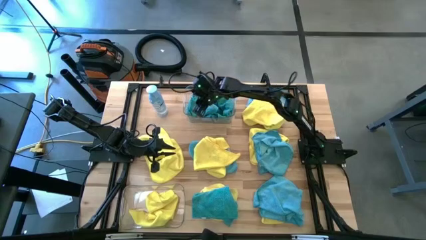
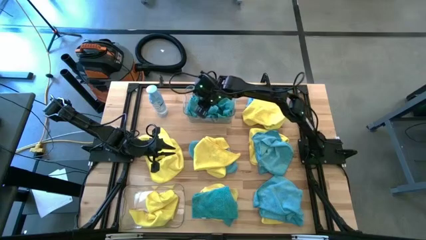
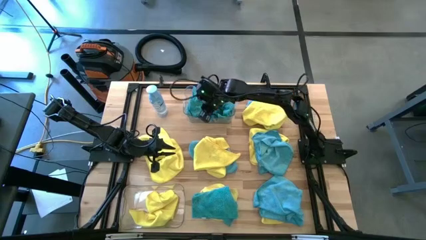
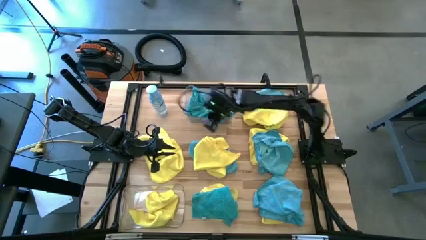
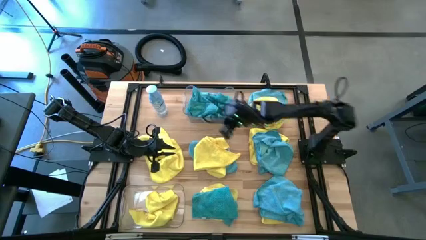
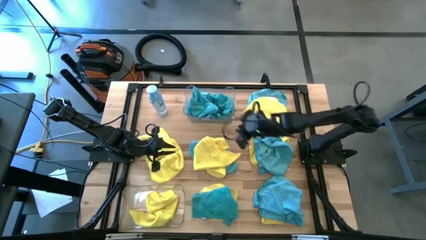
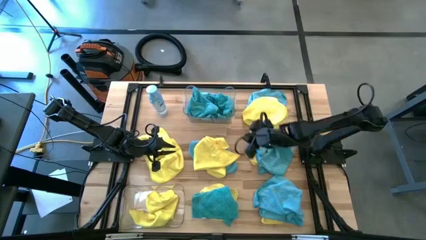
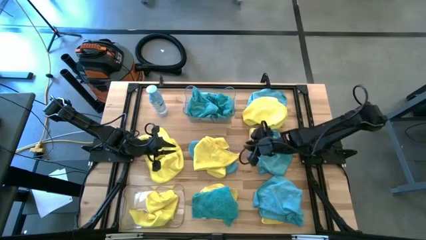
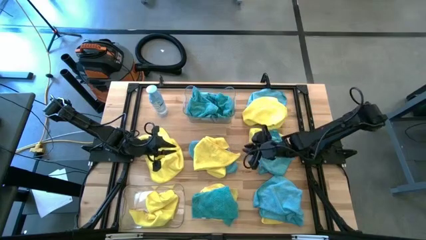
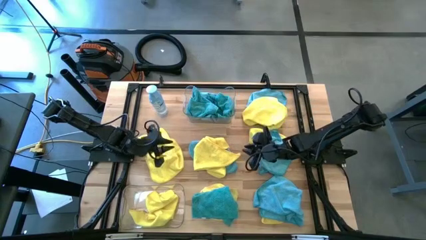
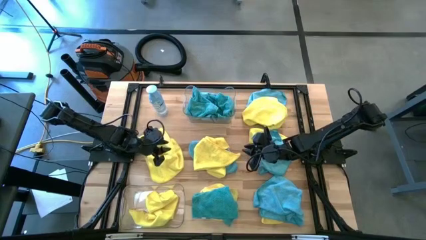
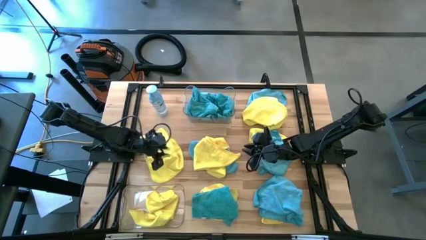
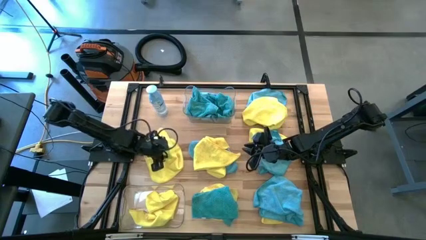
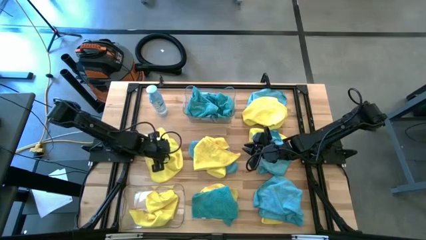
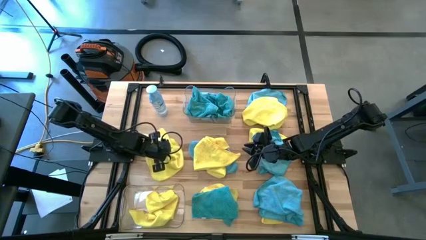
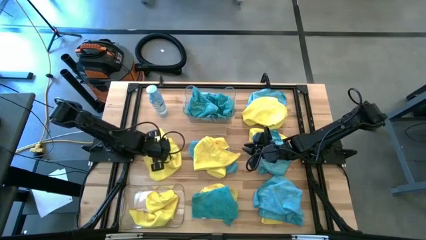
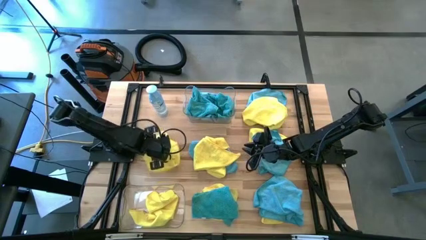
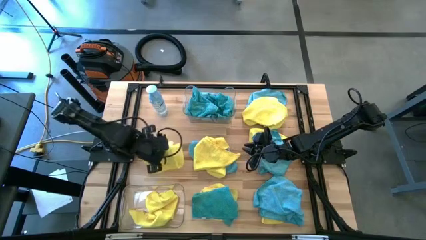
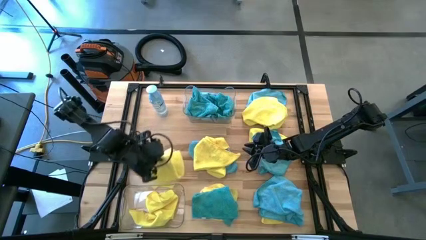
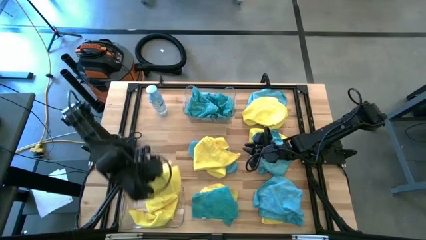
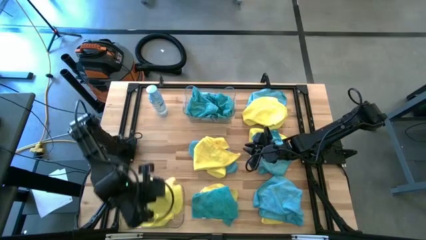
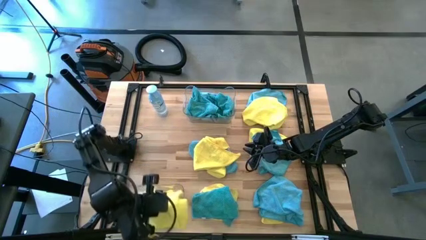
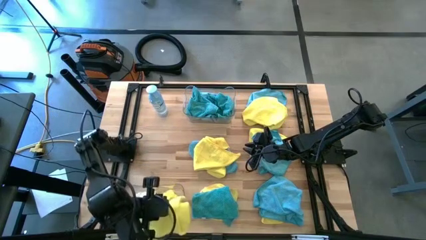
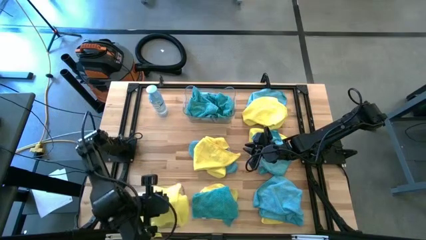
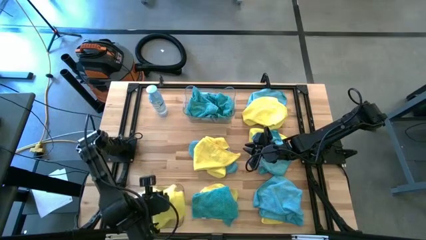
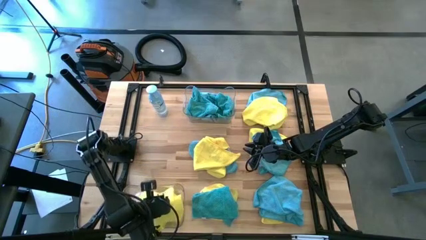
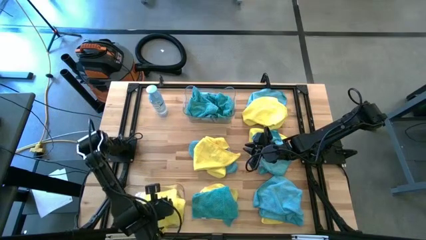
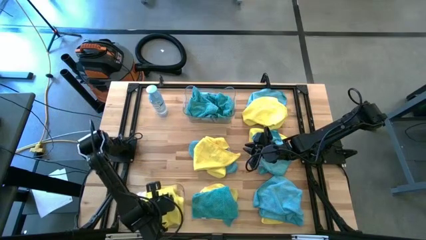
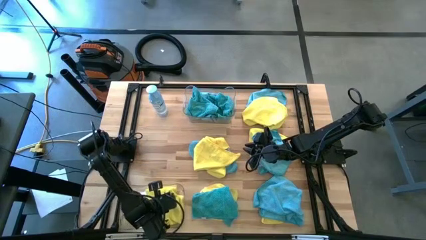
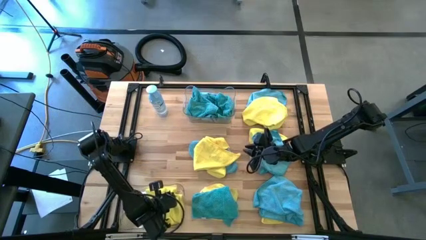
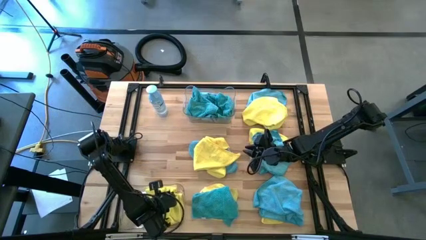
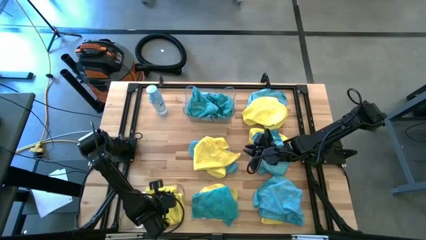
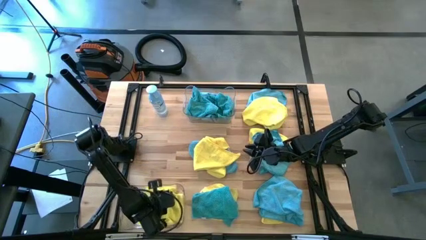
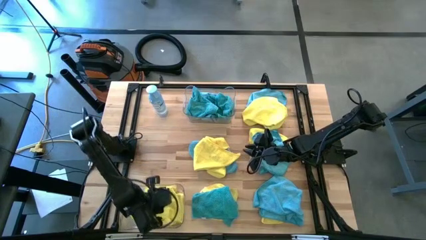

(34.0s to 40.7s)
Task: Sort microfiber towel by color & place in baskets
Put the yellow microfiber towel into the bottom transparent bin

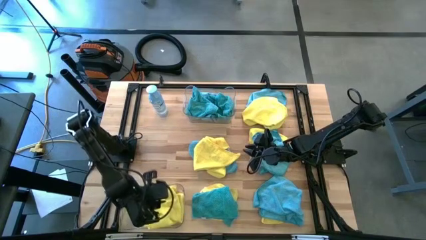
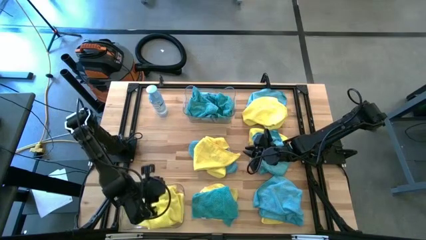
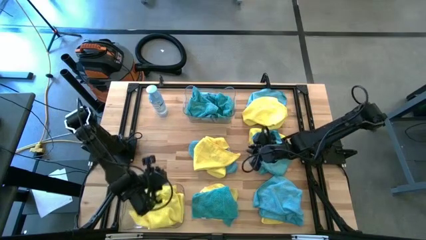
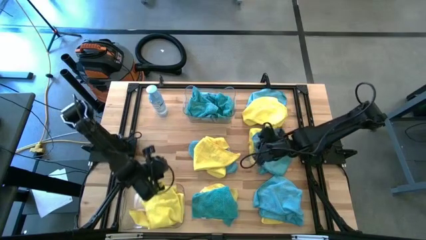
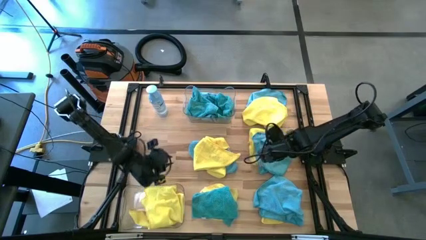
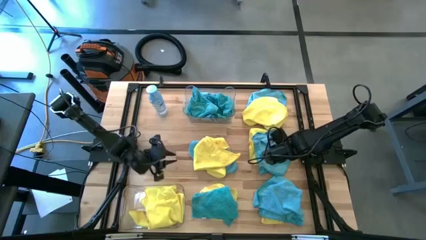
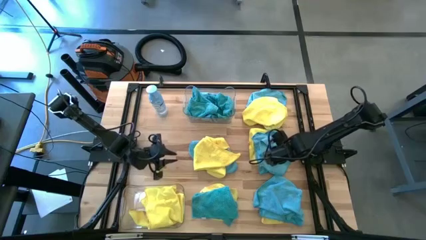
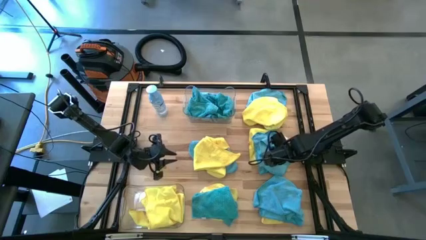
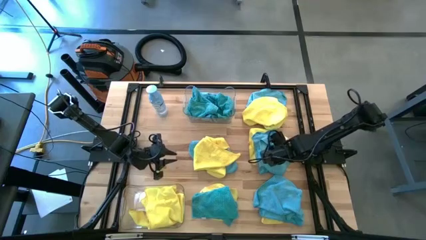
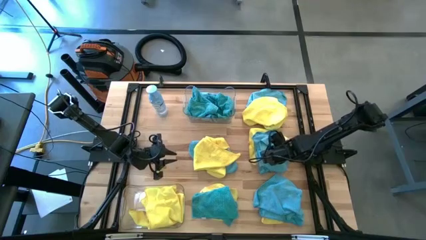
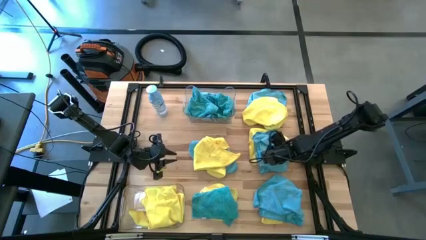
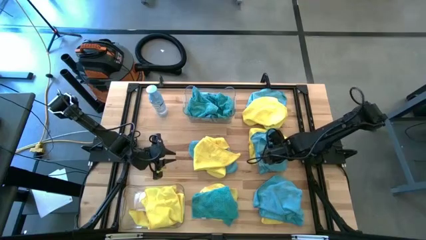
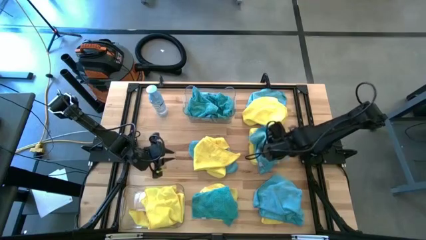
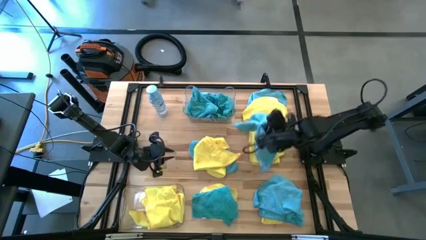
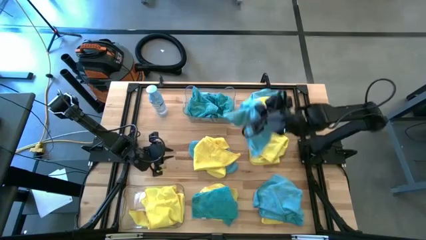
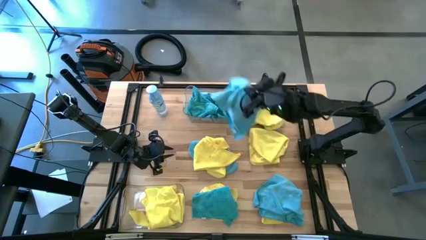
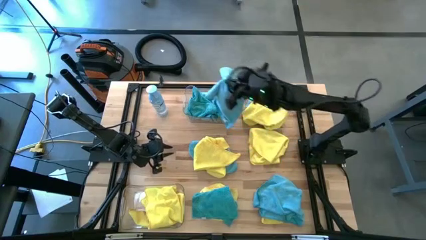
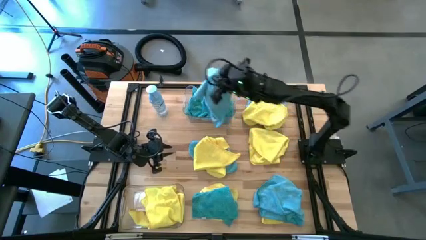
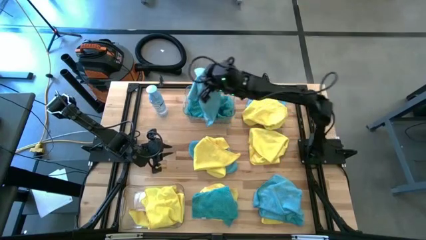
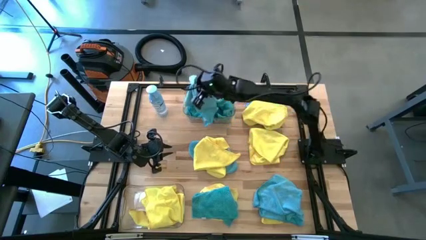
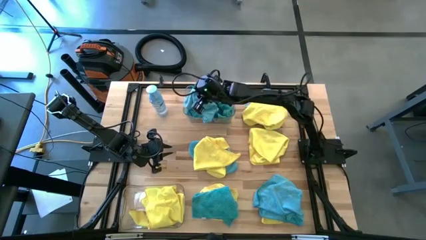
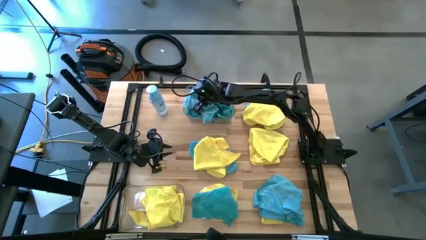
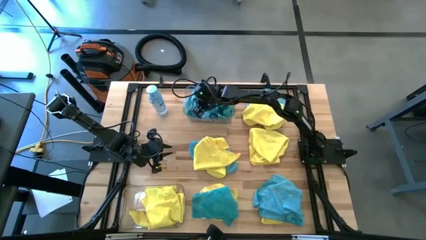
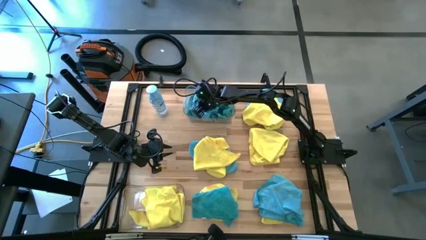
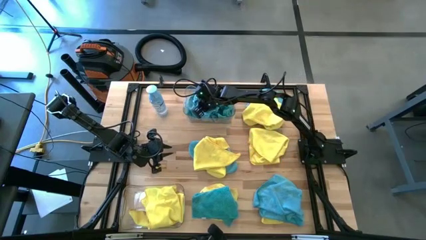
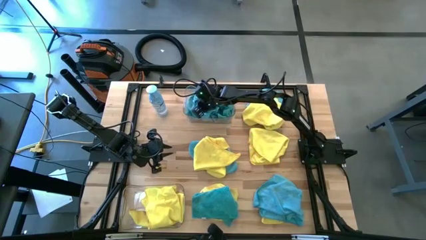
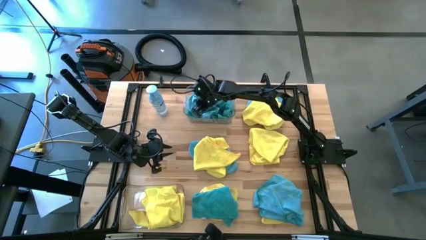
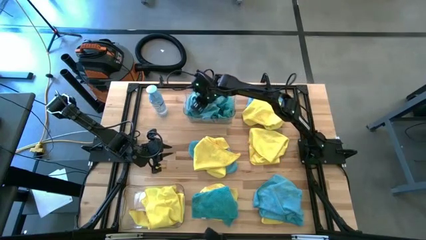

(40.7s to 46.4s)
Put the blue microfiber towel into the top transparent bin

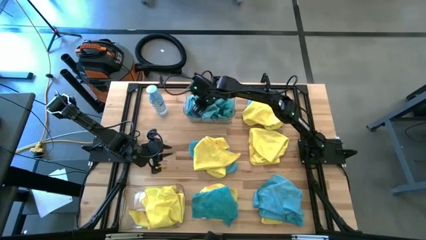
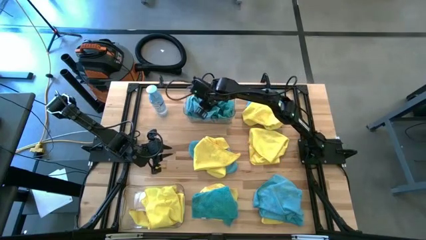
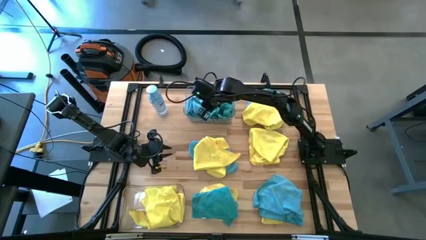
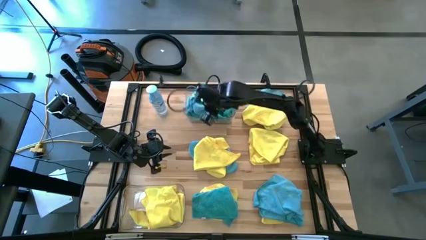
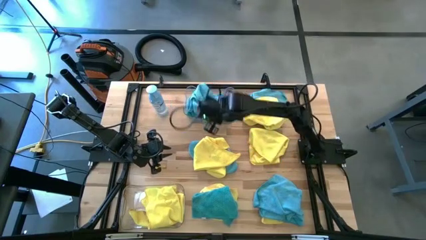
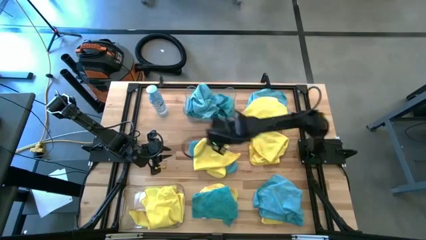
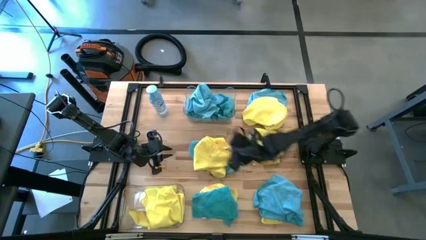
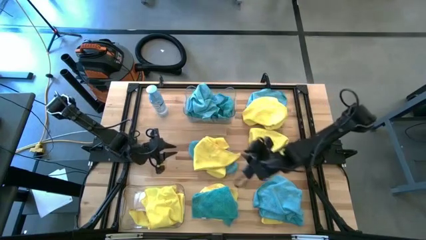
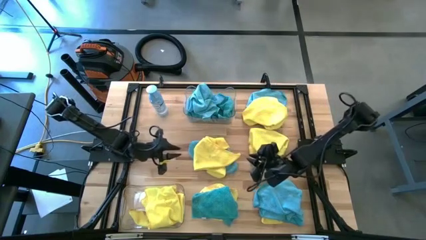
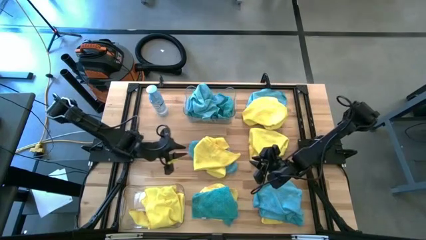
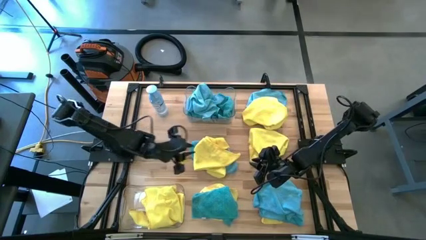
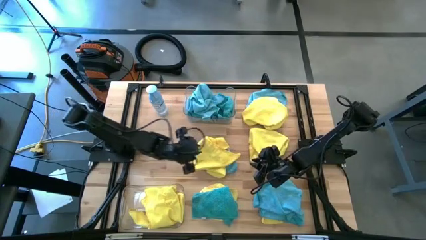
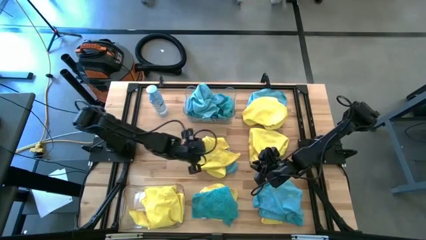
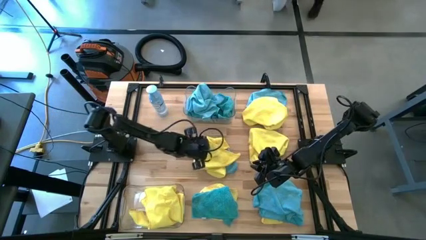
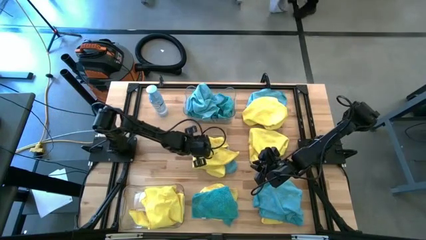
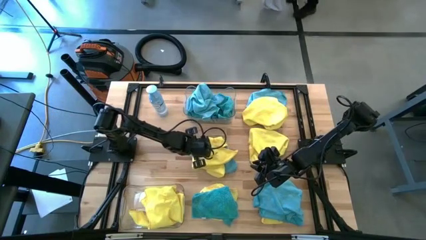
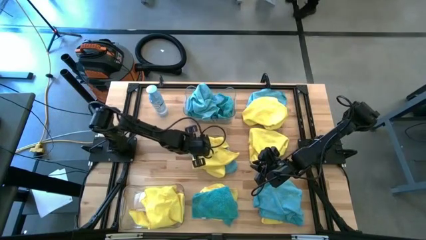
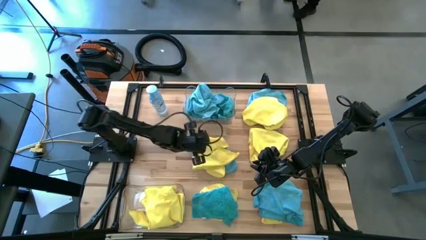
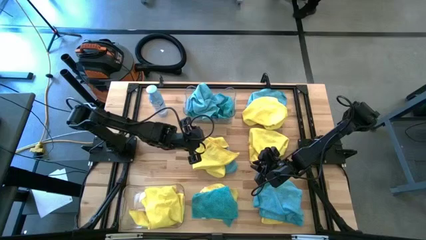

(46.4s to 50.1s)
Put the yellow microfiber towel into the bottom transparent bin
